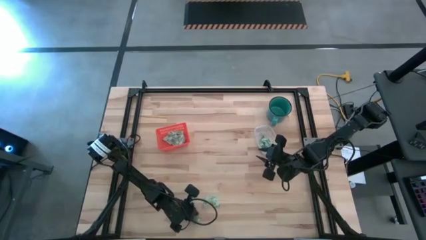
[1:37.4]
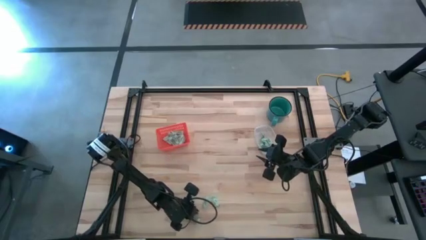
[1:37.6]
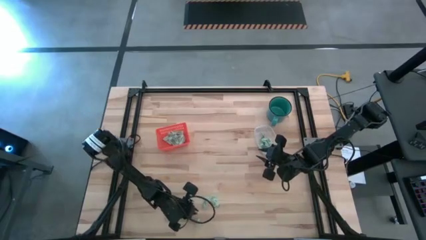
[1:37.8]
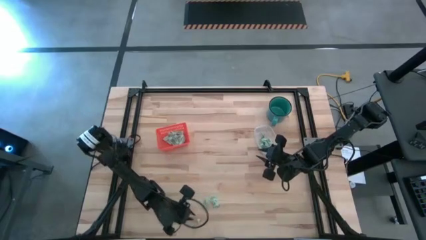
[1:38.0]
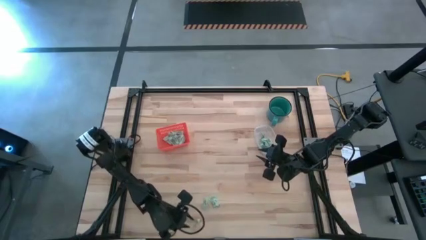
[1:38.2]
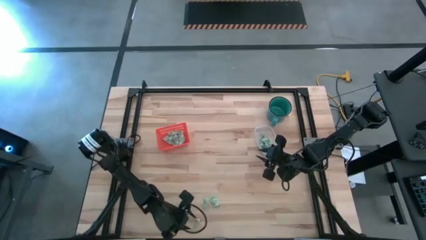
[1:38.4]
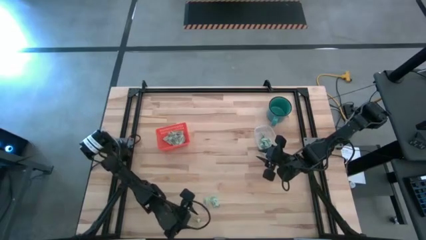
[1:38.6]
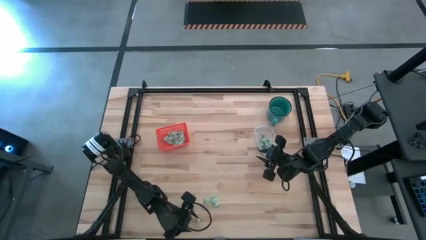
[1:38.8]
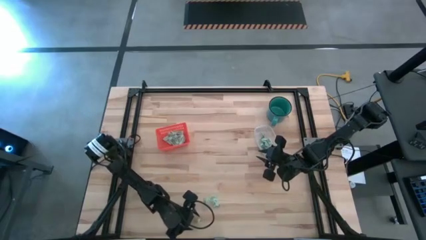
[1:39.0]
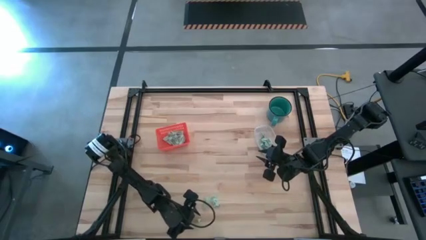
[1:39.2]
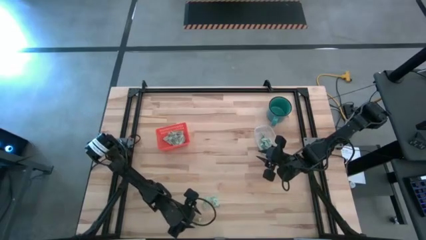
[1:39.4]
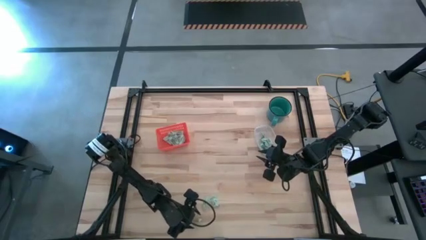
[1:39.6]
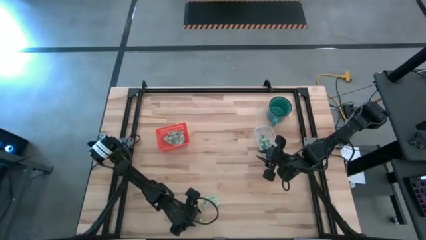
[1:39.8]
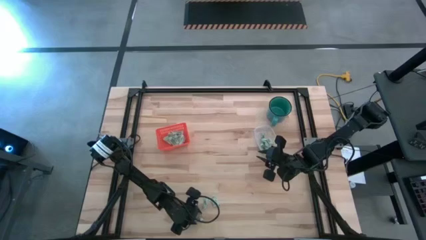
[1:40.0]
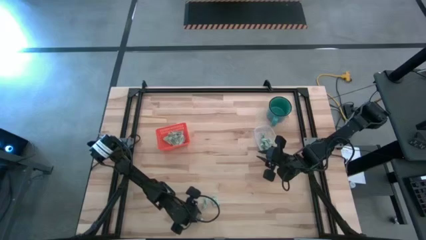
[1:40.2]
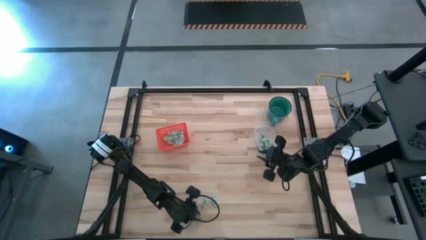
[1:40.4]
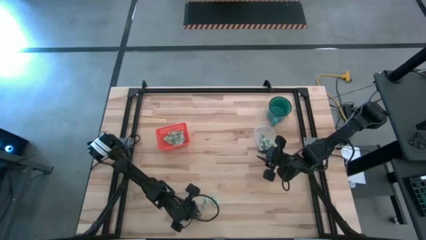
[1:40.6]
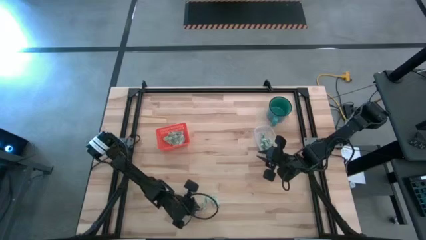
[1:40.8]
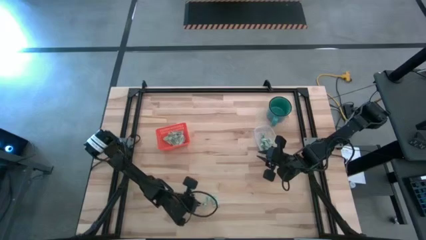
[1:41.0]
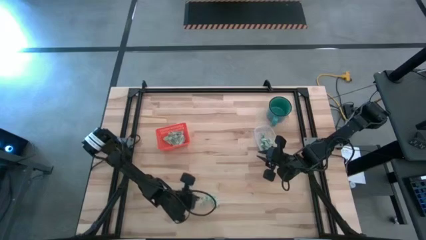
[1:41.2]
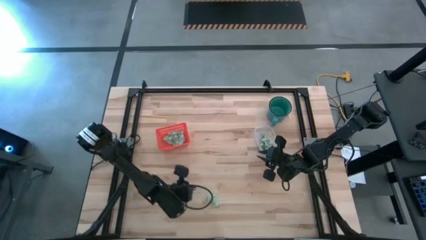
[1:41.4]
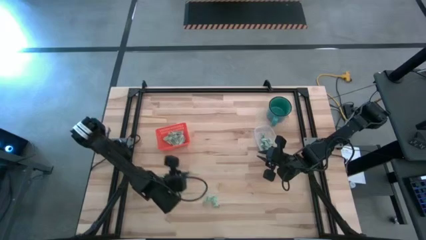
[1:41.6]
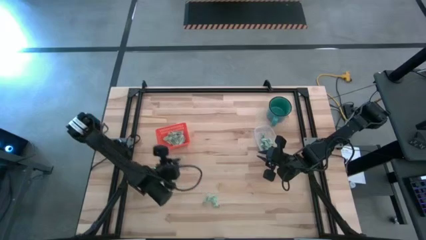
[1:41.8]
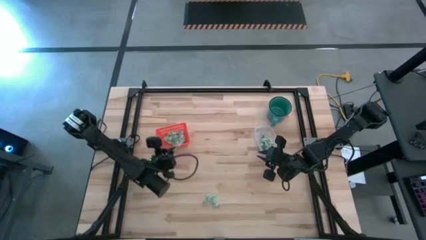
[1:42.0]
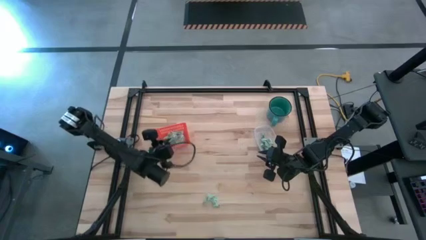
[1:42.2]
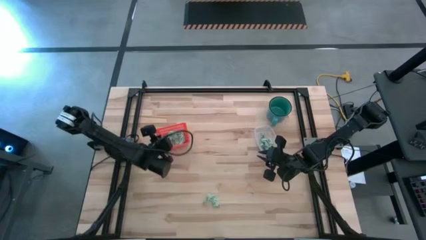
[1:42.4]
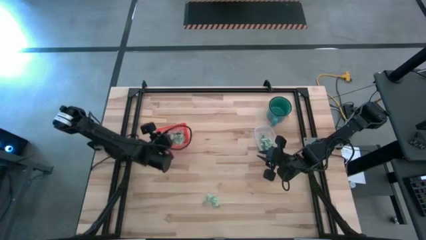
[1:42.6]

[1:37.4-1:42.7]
Task: Pick and place items into bin
Put the stevia packet into the orange bin

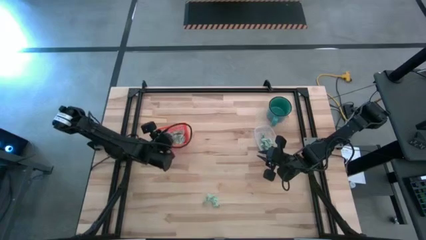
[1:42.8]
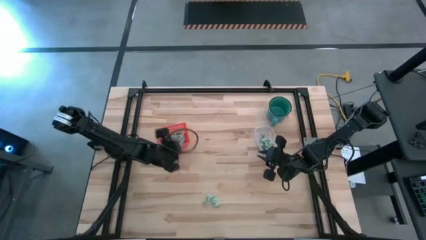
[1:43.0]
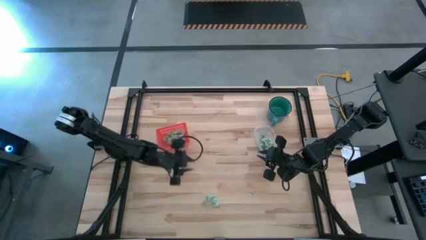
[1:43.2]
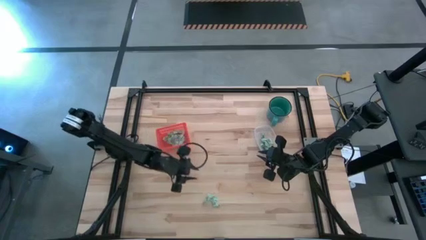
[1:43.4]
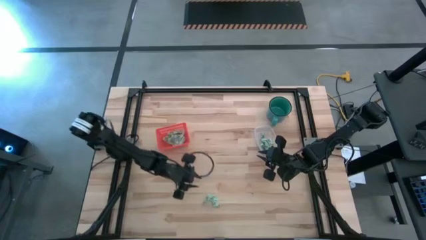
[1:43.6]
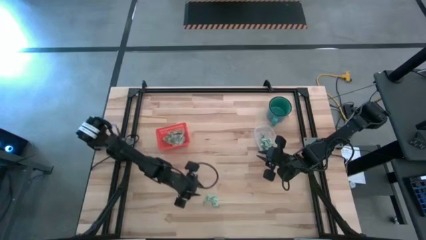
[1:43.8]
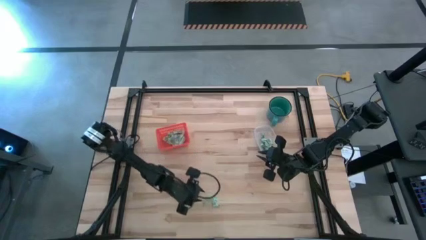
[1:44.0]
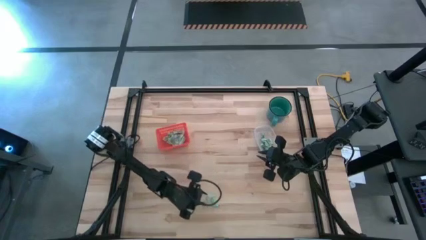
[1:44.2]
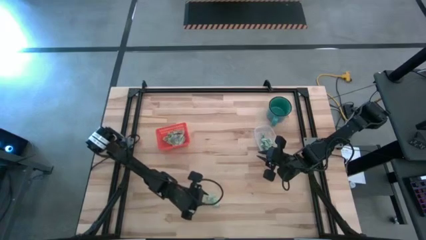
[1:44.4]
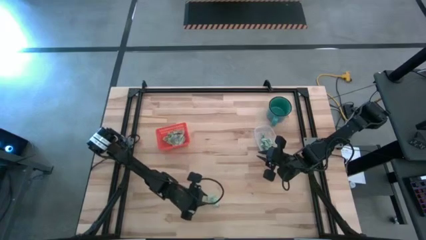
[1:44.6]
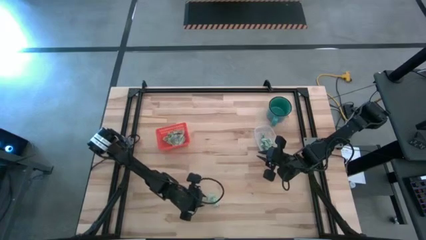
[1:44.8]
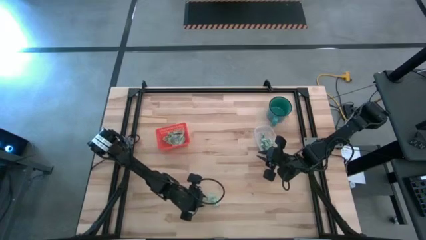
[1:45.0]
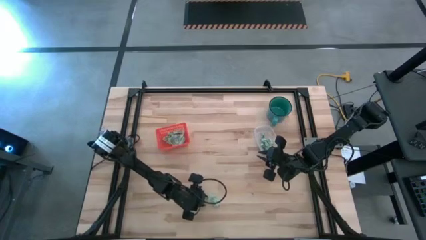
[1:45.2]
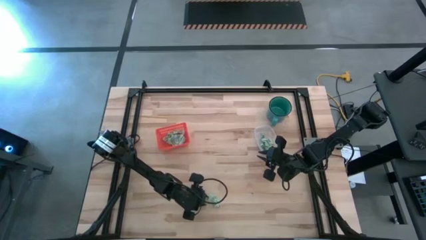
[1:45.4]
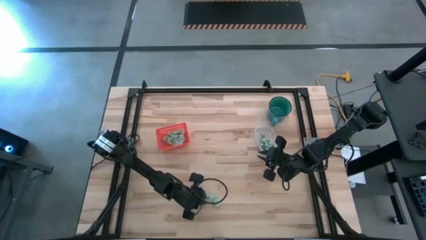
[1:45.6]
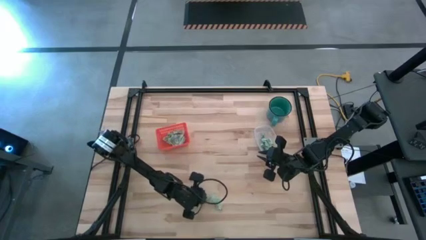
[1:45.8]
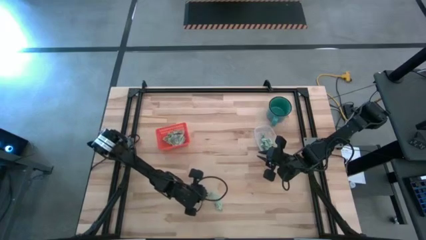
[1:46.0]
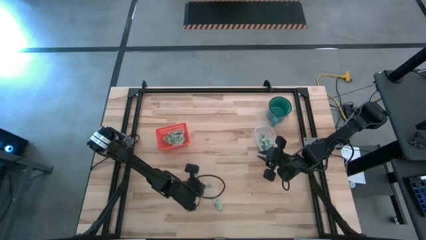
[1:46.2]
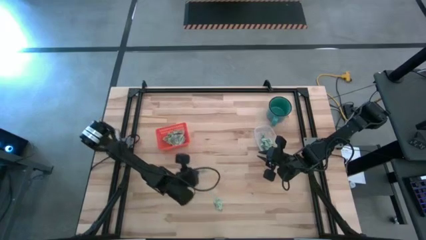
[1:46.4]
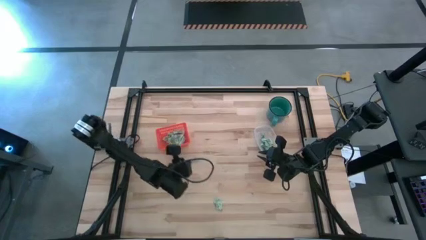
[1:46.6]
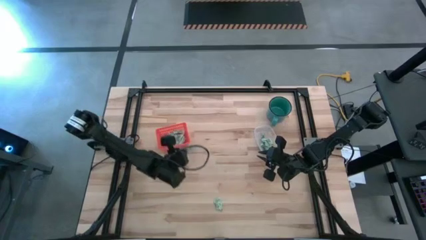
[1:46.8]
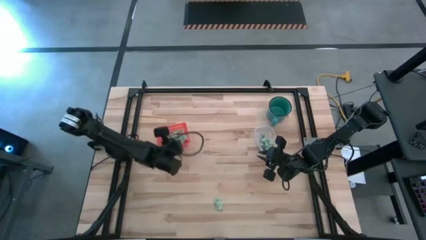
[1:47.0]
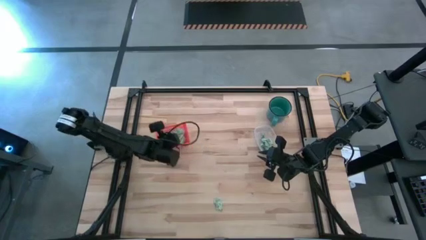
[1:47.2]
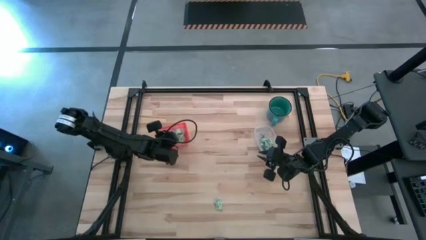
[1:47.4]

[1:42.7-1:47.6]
Put the stevia packet into the orange bin

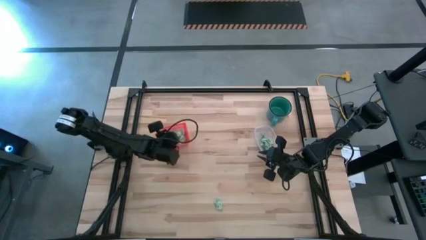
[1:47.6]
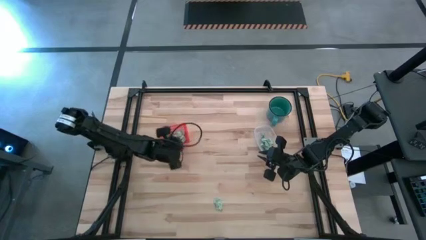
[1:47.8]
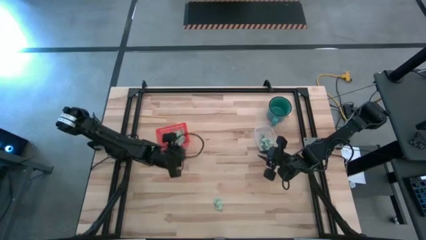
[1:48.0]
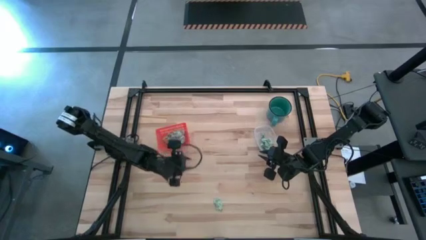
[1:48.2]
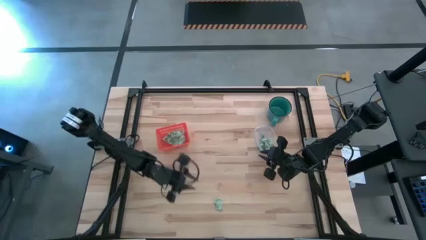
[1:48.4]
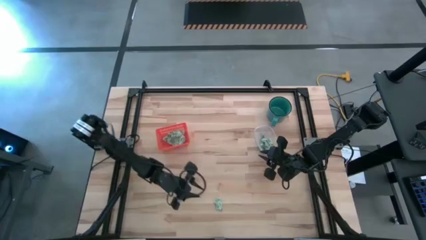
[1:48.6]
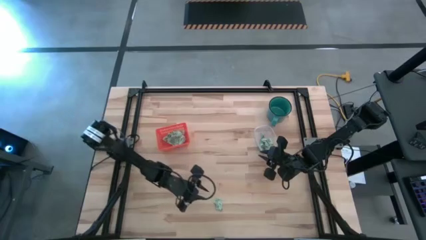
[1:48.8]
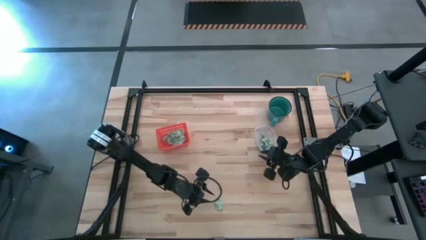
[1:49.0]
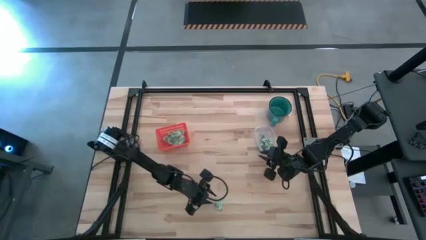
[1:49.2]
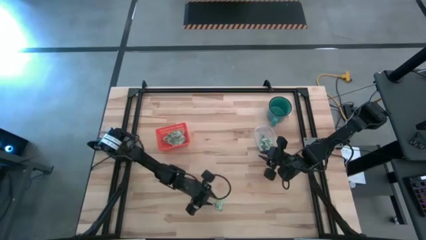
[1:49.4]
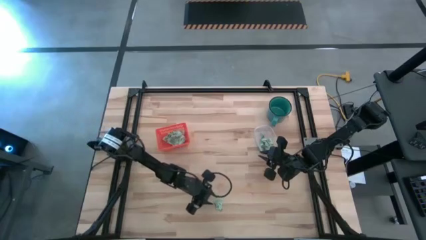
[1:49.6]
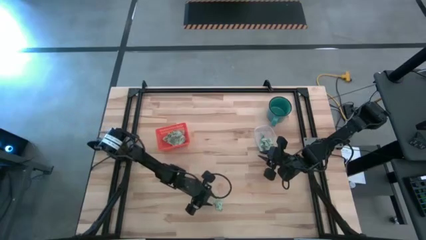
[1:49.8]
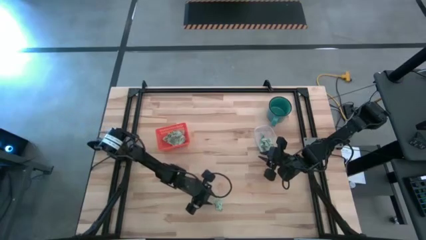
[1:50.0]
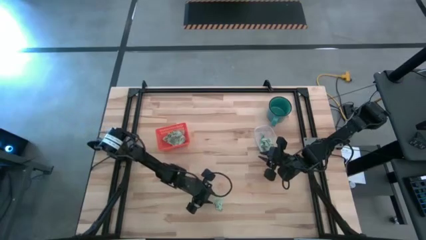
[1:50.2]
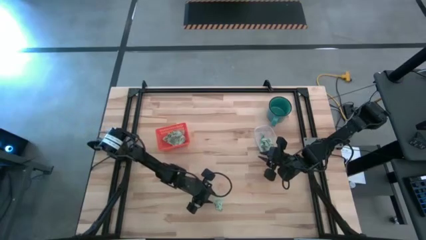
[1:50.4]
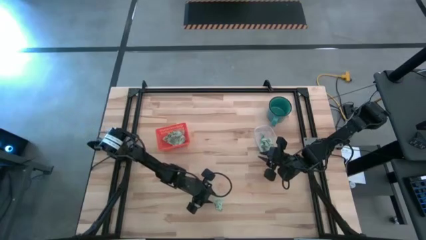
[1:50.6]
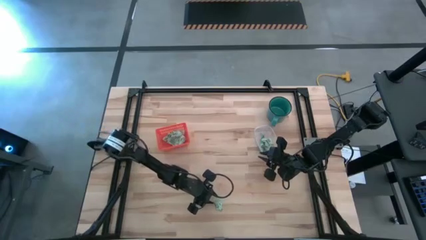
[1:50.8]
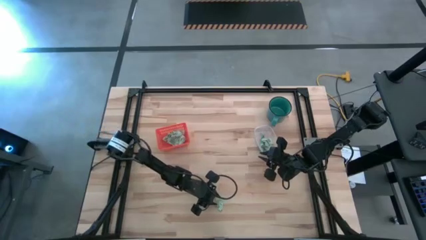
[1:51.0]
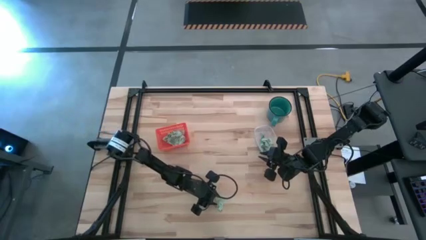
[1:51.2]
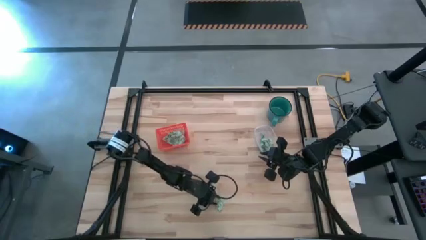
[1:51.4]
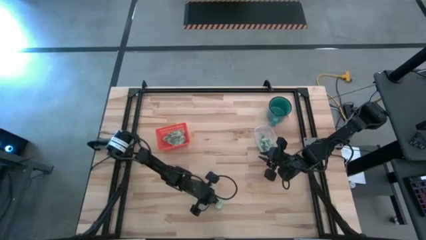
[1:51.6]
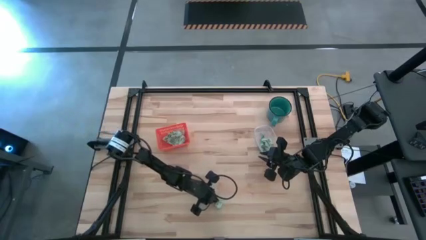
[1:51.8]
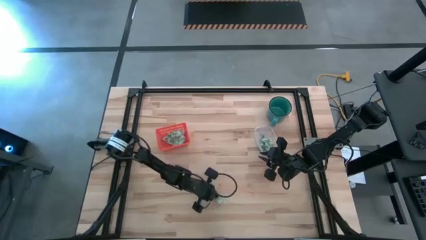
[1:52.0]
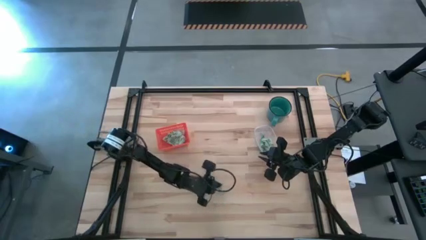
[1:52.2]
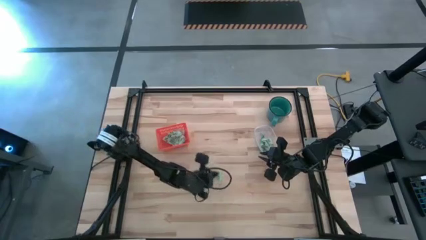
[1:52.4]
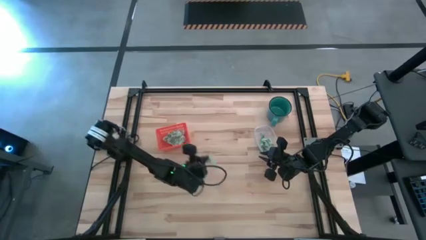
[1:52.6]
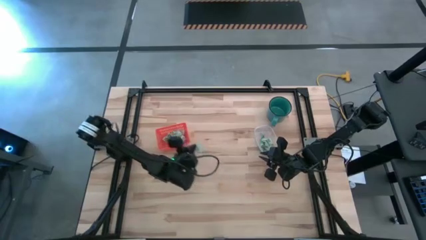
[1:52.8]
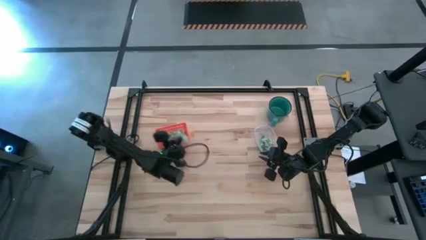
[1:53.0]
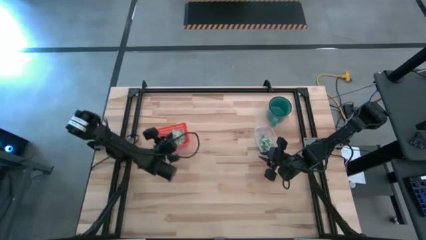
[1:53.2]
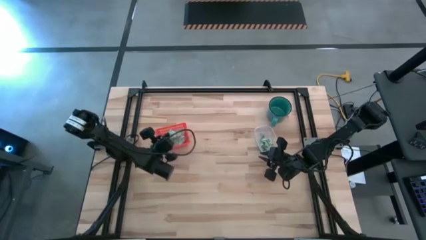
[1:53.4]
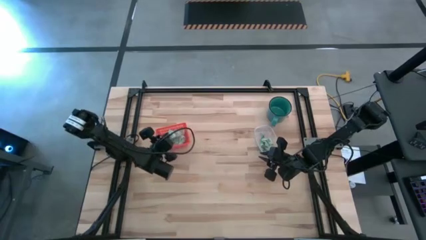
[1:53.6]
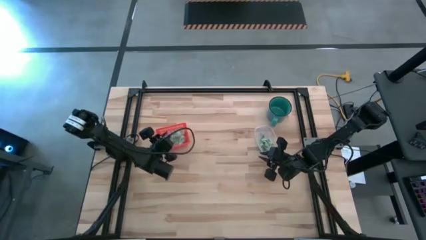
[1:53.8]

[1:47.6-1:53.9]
Put the stevia packet into the orange bin
